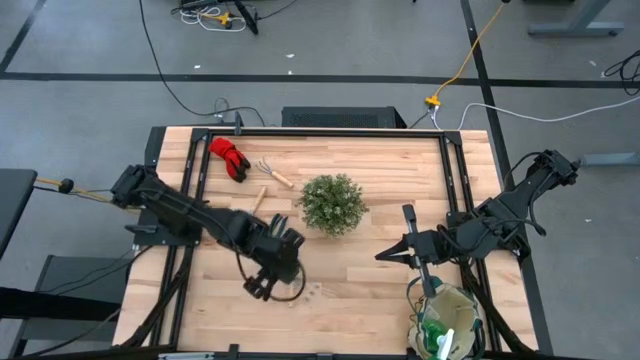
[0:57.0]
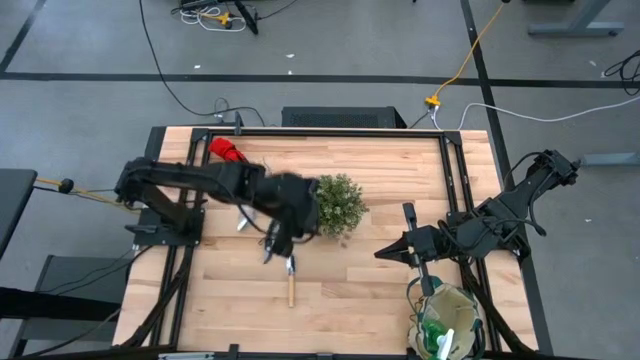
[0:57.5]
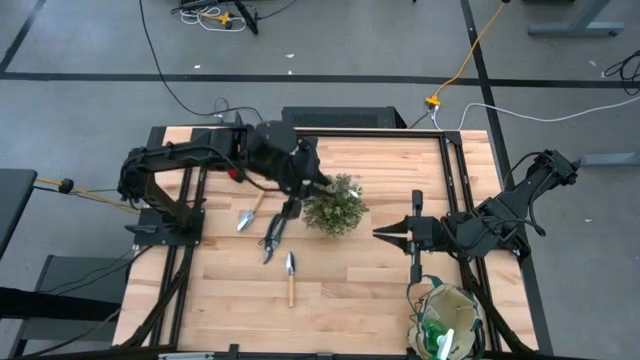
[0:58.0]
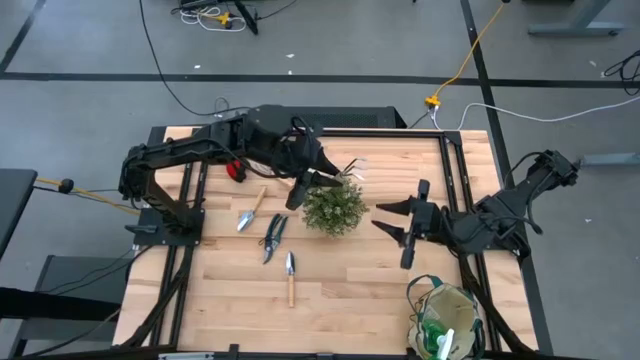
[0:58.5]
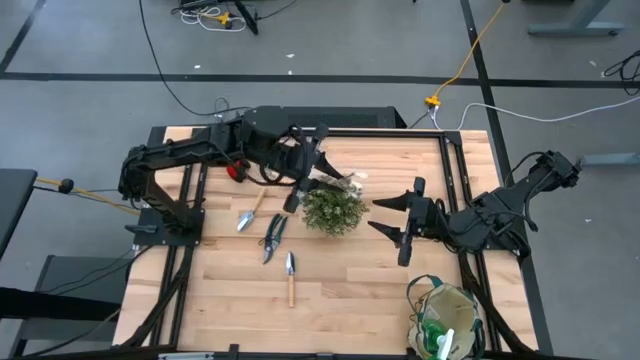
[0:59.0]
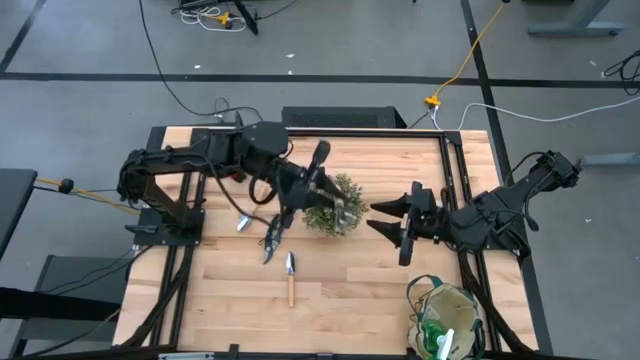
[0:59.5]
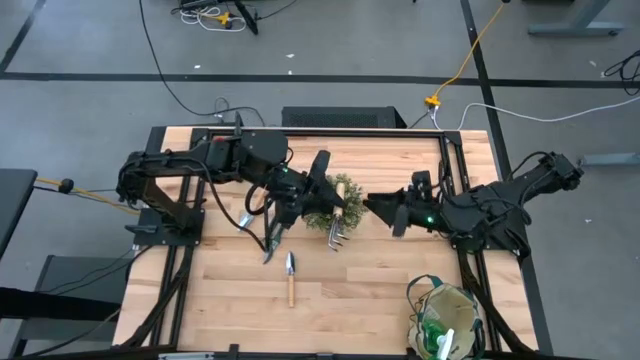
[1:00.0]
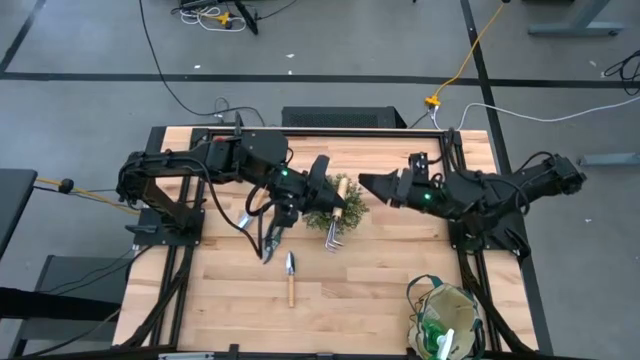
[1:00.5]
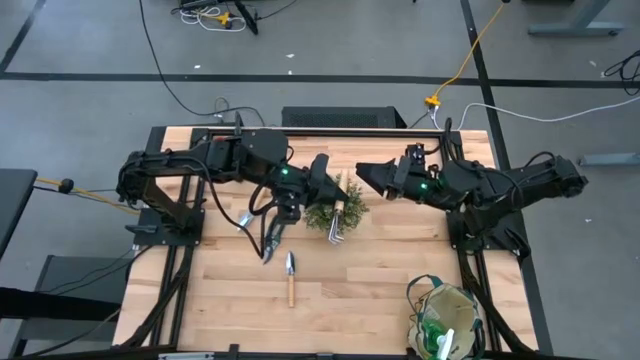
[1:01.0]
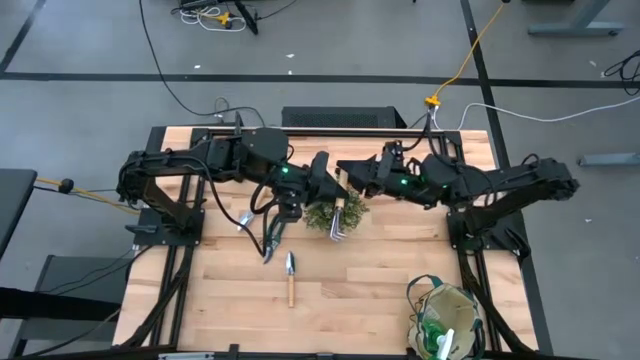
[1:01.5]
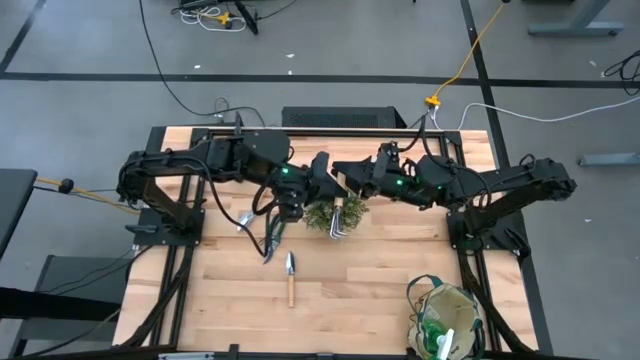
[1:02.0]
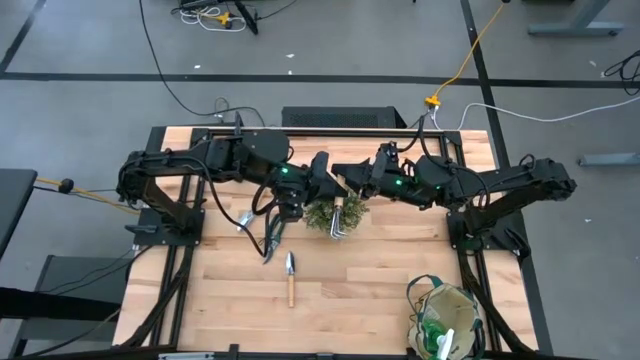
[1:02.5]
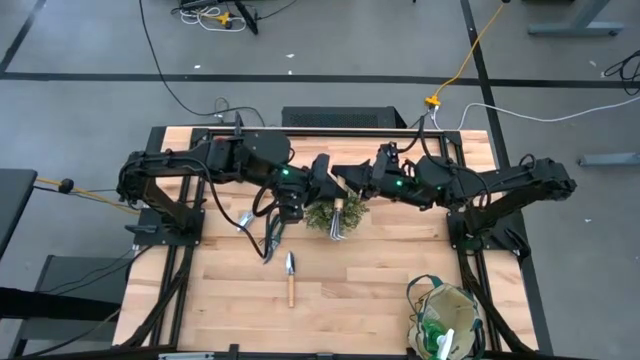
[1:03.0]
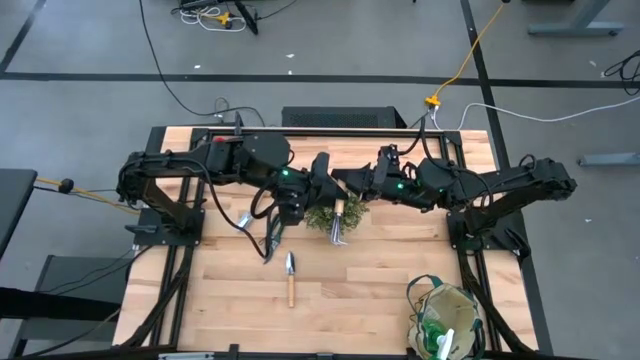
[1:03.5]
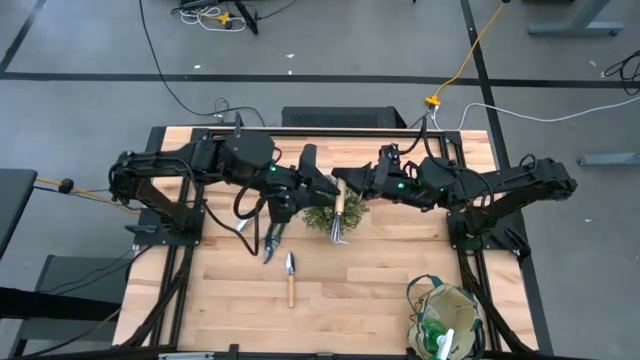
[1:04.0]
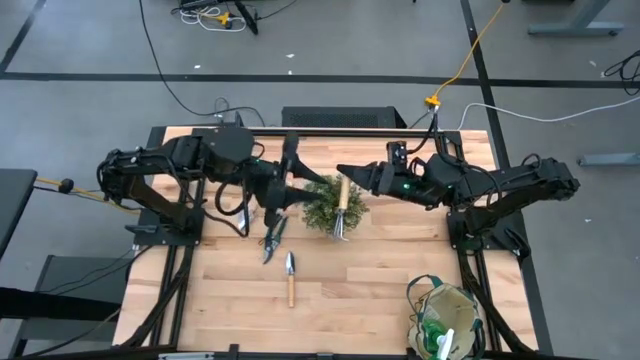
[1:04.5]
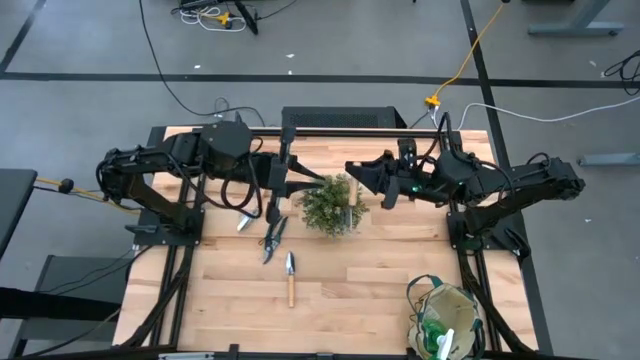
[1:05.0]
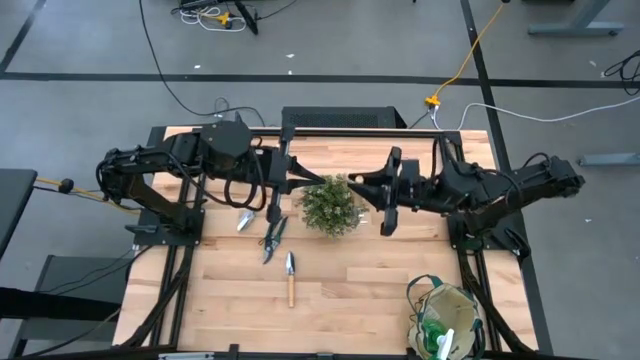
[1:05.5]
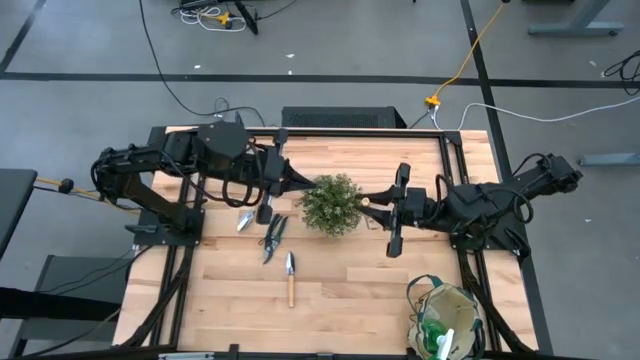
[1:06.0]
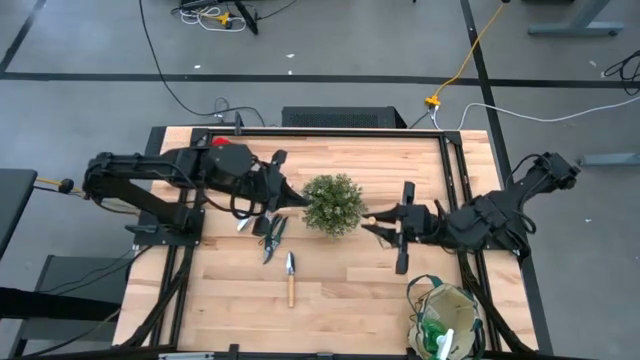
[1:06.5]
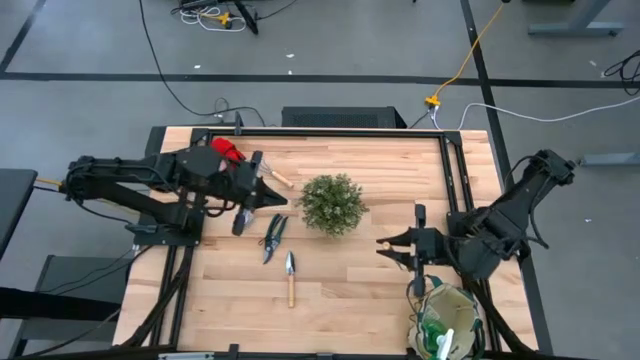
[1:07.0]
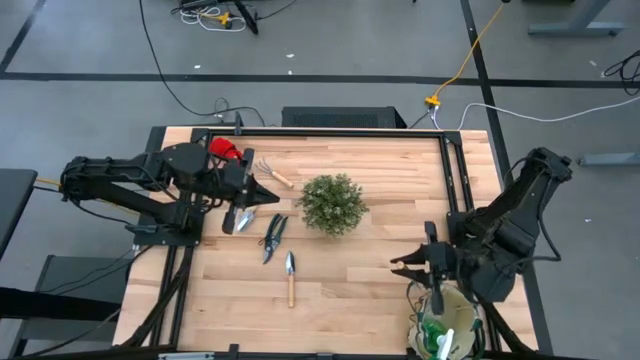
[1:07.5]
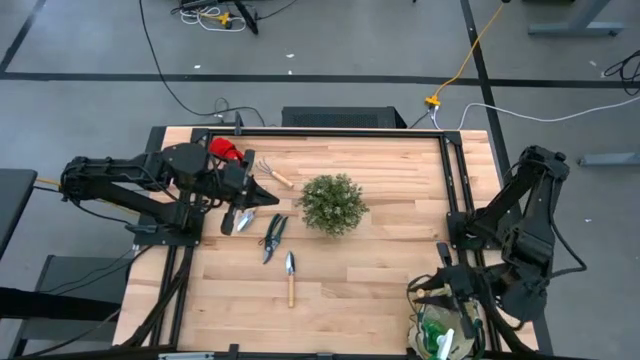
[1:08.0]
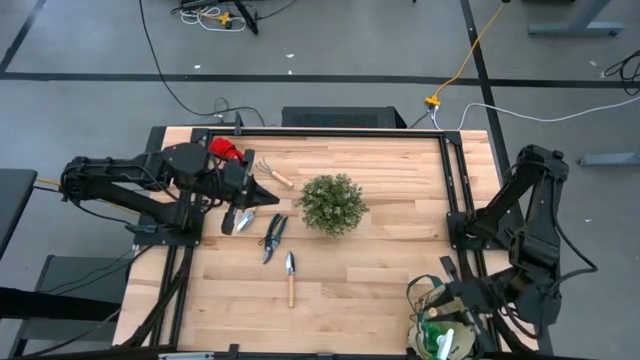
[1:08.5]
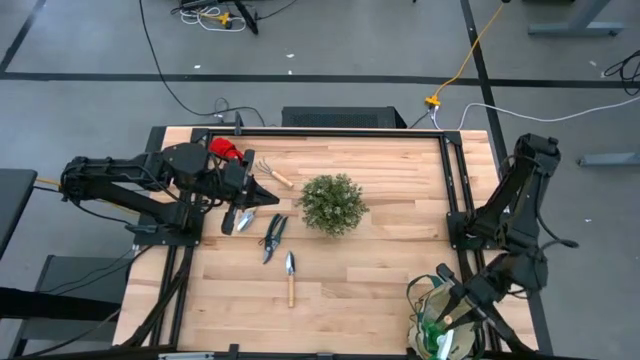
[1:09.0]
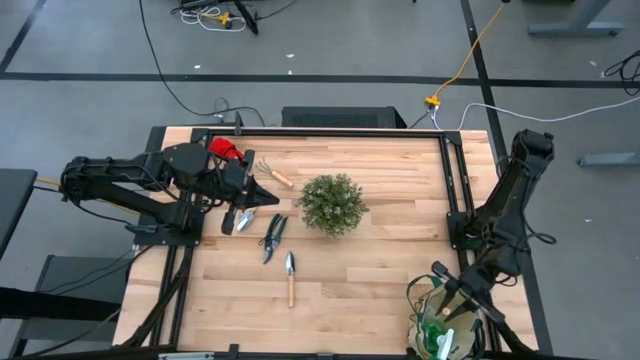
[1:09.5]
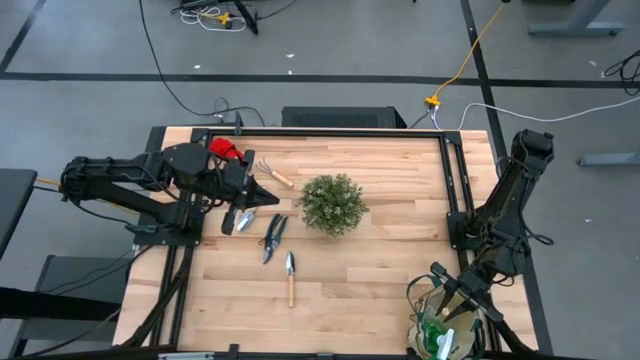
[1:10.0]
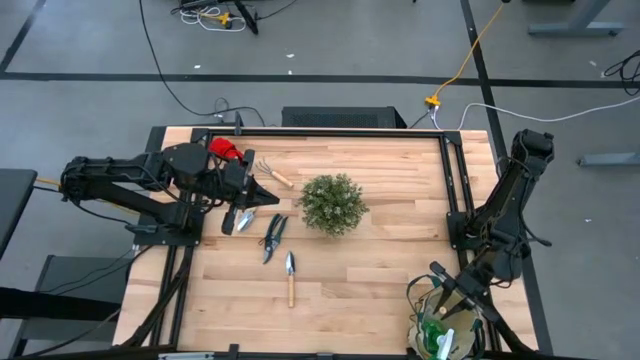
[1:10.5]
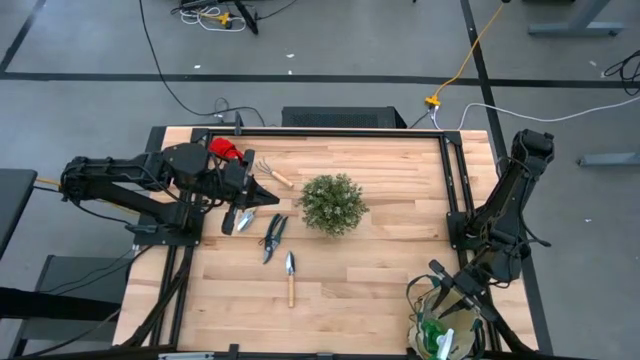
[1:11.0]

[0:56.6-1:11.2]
Task: Pick & Place Garden tools in Gardening bag
Put the bottom brown hand rake into the white gardening bag

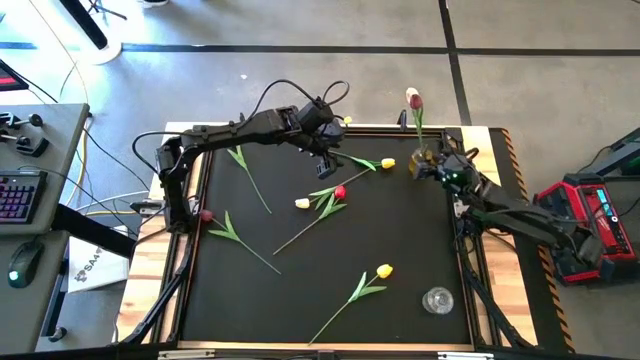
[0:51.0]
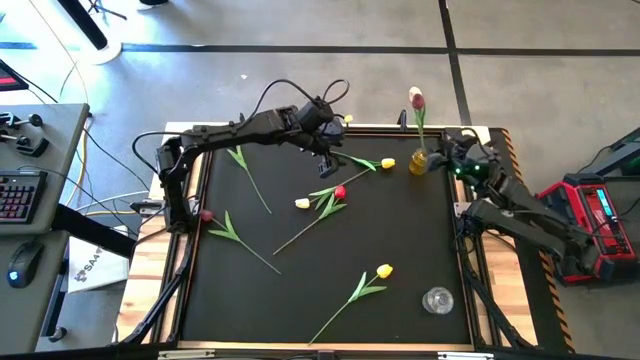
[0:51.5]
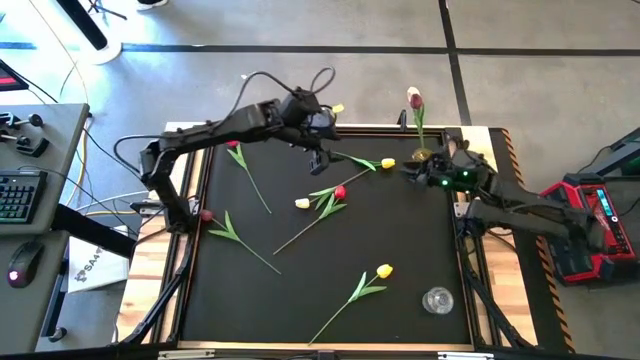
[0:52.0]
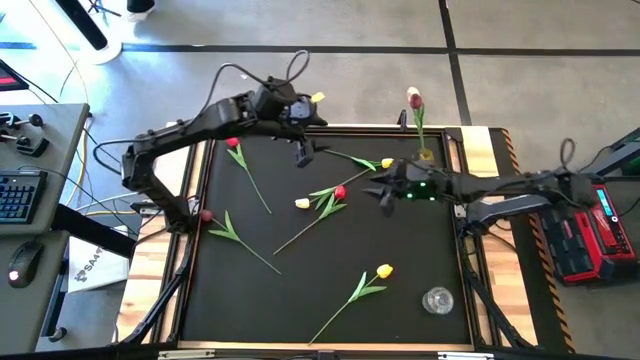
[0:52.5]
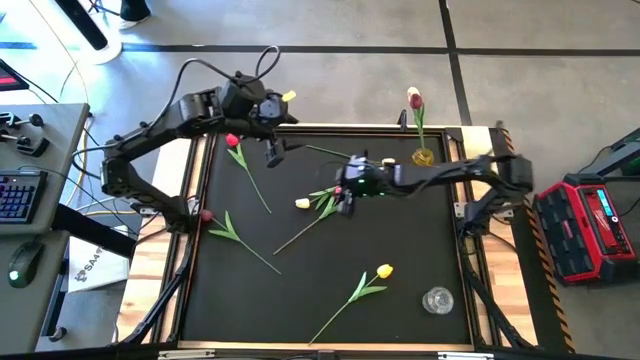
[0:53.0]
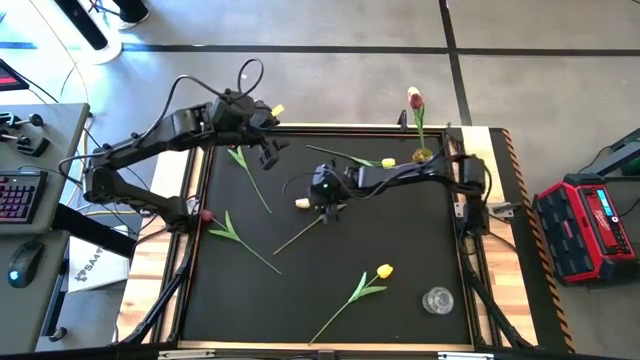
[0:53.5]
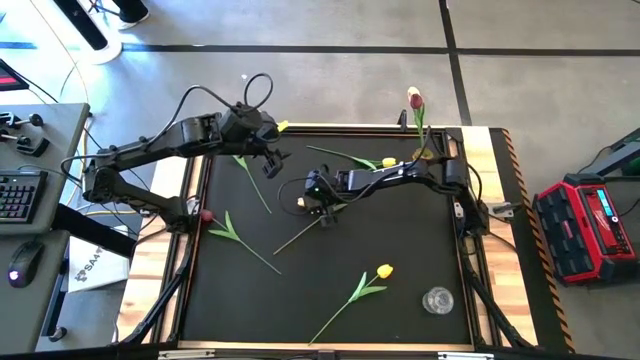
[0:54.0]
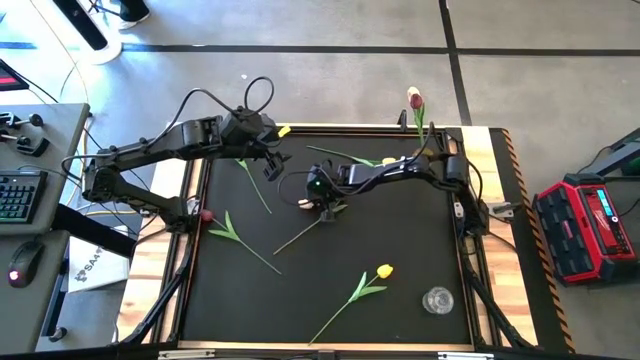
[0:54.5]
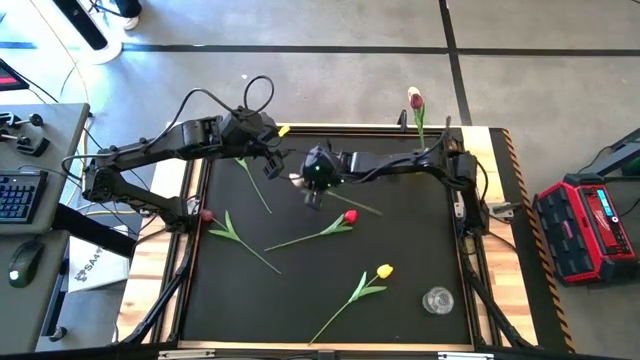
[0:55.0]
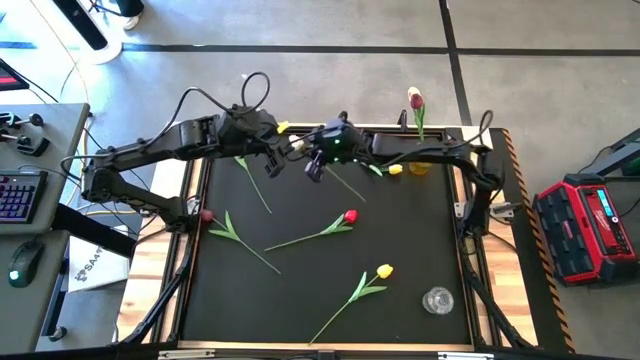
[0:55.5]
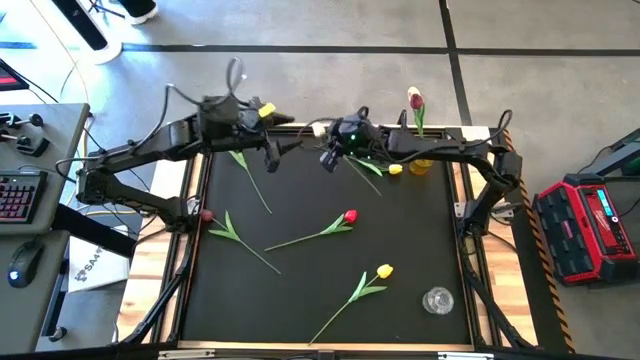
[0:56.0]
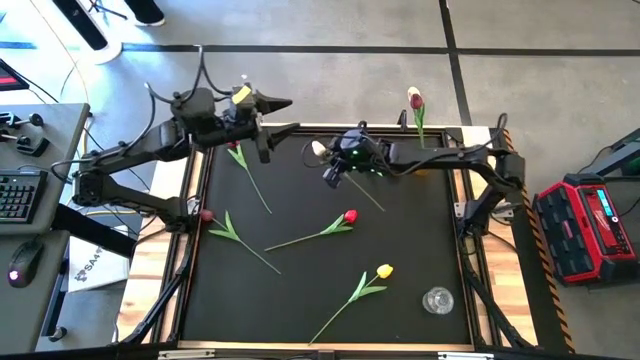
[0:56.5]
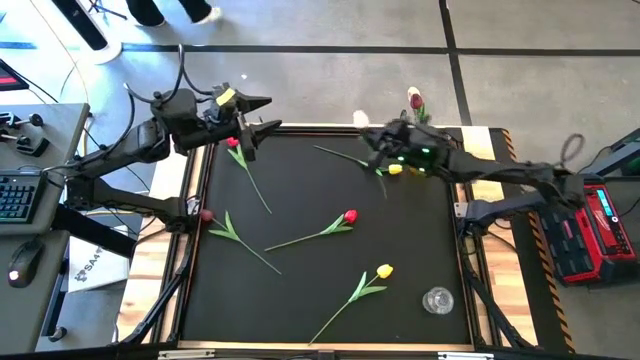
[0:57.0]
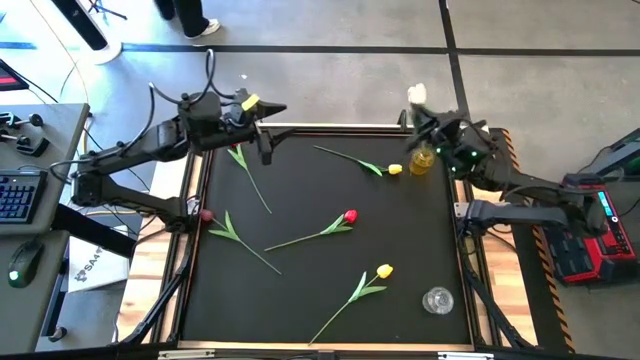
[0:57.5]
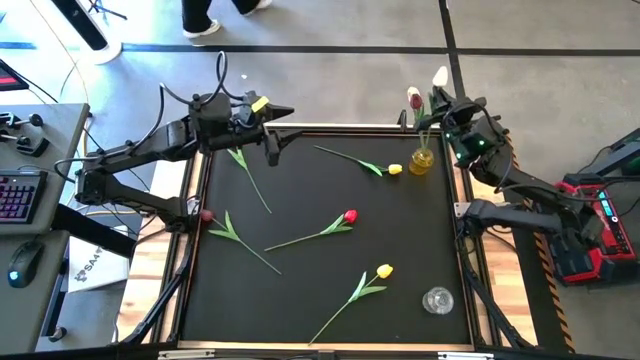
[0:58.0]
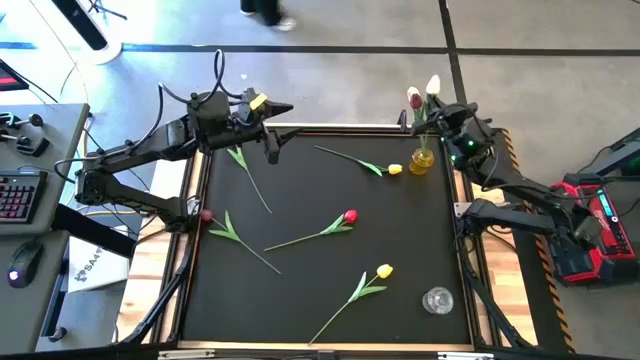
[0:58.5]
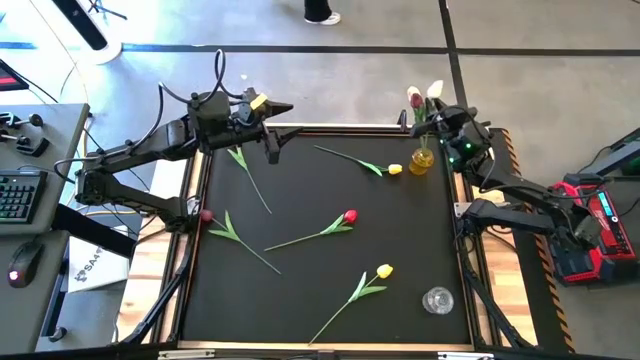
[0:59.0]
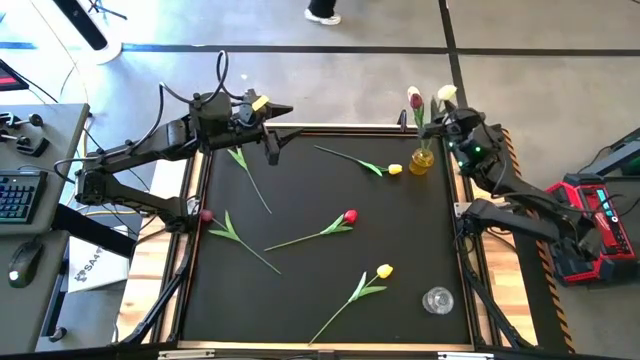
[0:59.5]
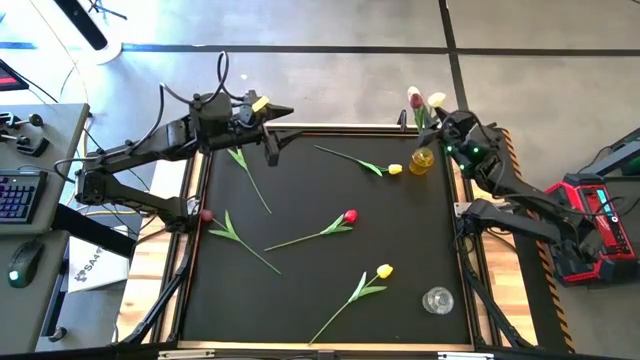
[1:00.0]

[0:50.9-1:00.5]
Task: Sort flowers into vase by color
Put the white flower into the yellow flower vase
